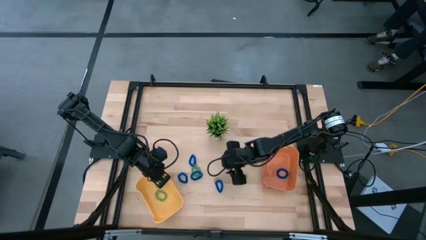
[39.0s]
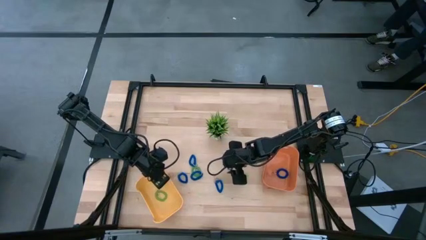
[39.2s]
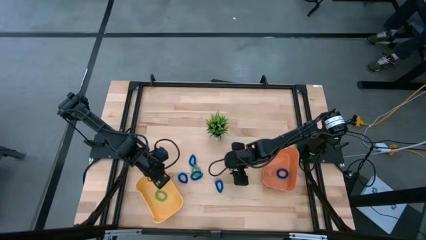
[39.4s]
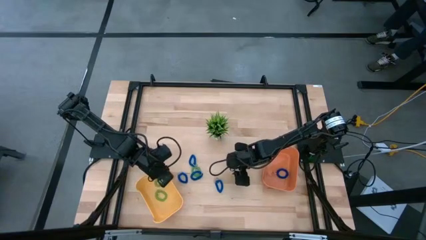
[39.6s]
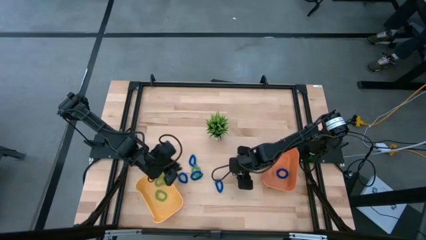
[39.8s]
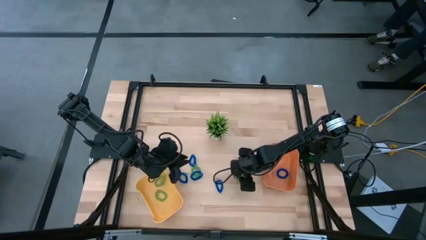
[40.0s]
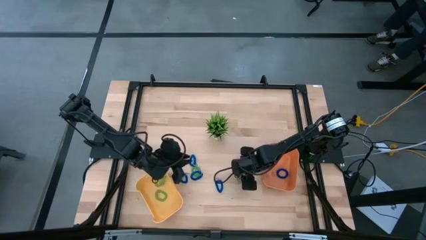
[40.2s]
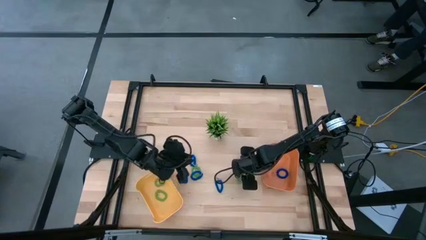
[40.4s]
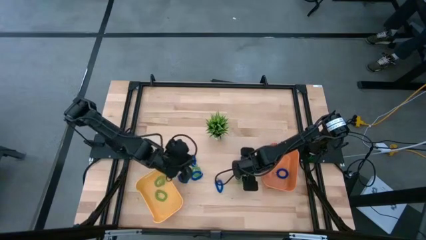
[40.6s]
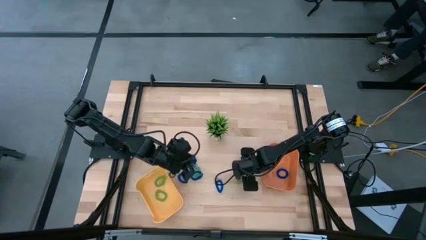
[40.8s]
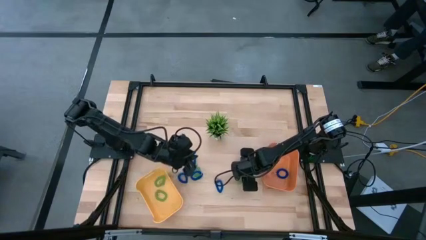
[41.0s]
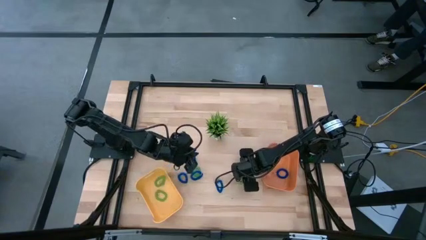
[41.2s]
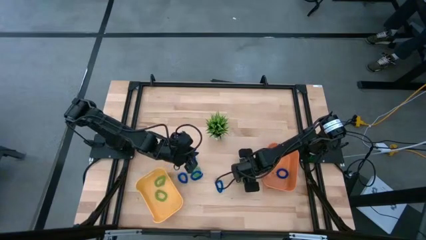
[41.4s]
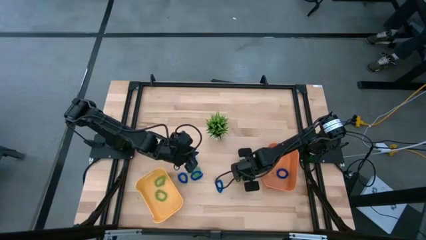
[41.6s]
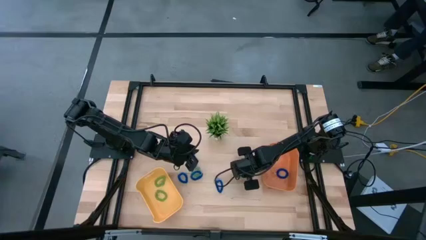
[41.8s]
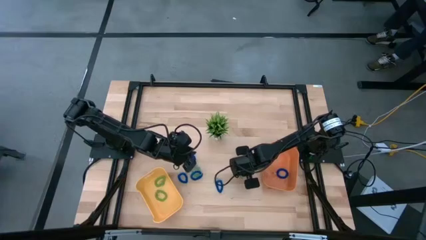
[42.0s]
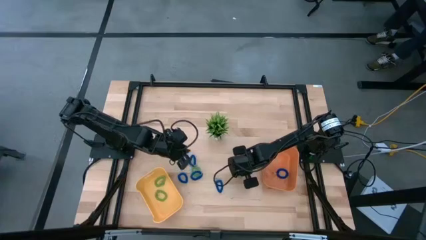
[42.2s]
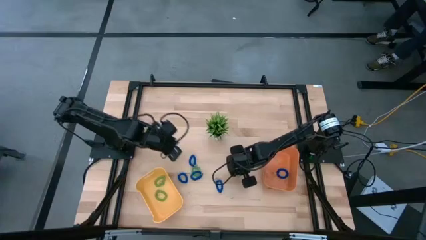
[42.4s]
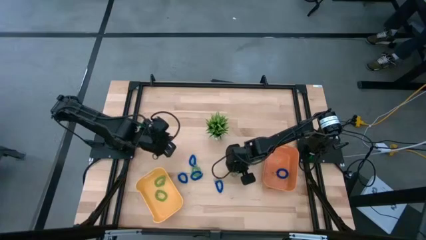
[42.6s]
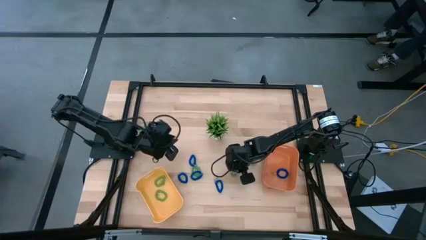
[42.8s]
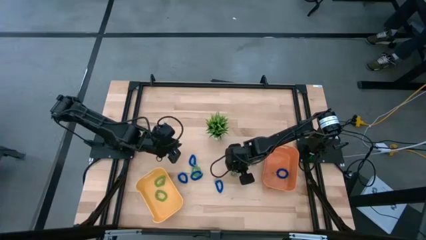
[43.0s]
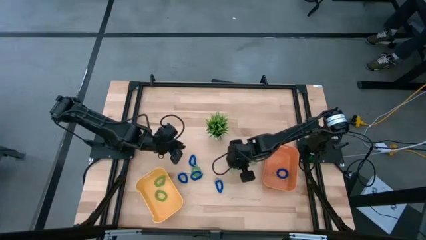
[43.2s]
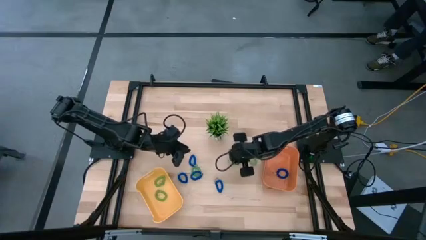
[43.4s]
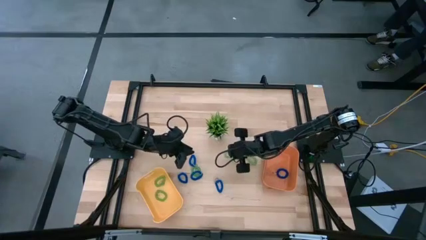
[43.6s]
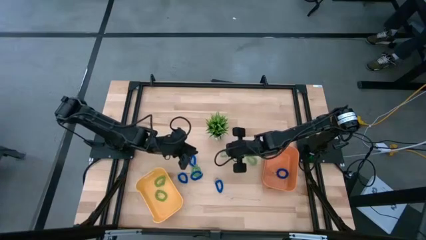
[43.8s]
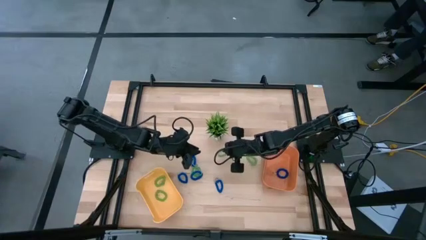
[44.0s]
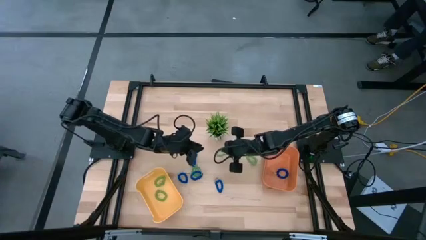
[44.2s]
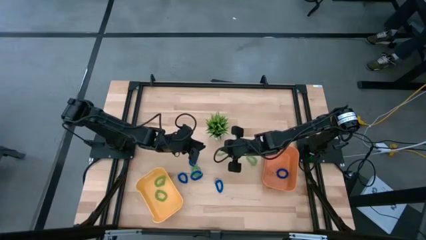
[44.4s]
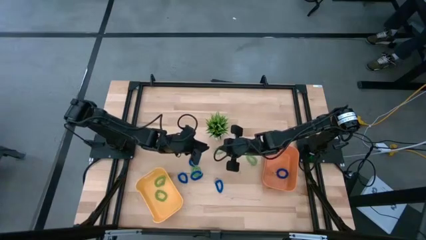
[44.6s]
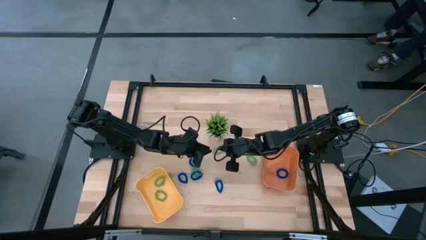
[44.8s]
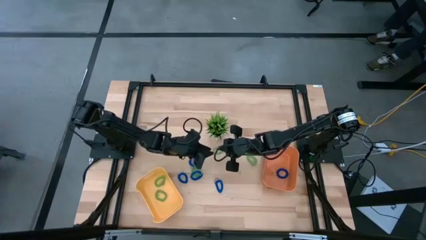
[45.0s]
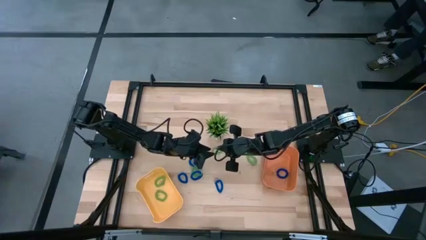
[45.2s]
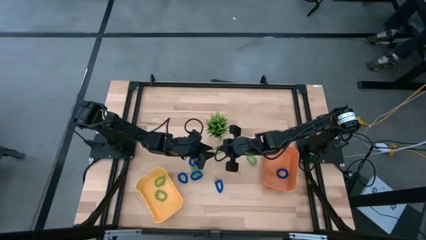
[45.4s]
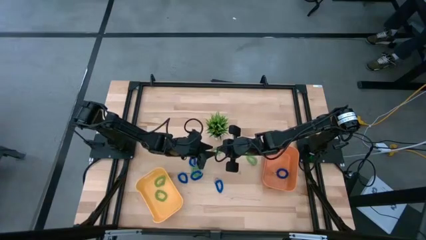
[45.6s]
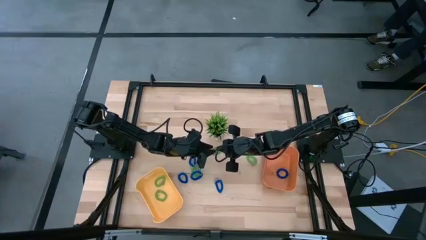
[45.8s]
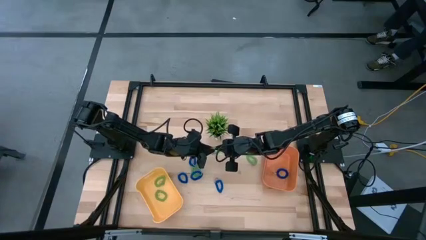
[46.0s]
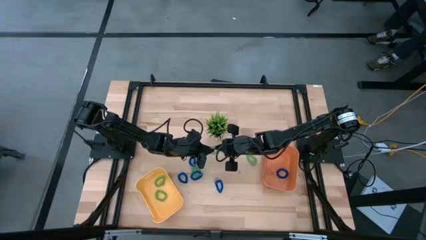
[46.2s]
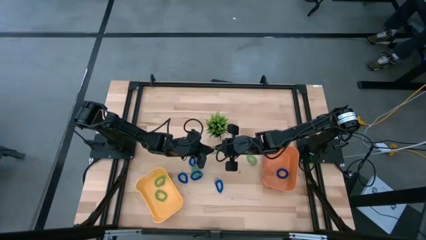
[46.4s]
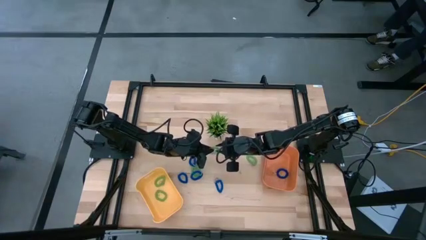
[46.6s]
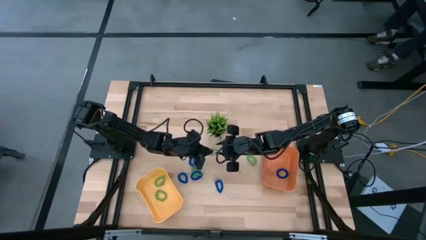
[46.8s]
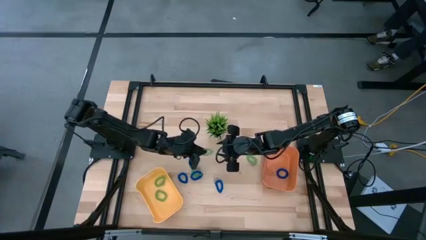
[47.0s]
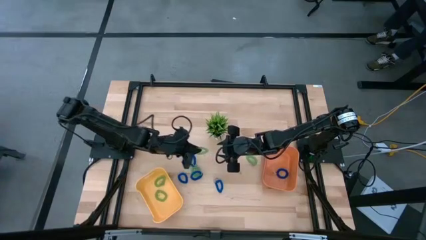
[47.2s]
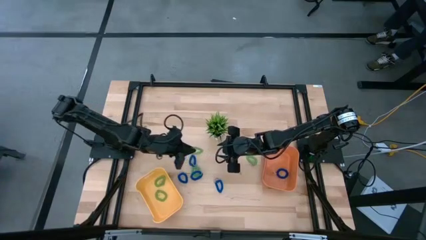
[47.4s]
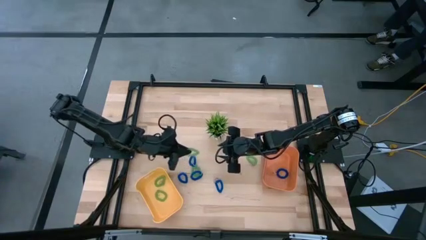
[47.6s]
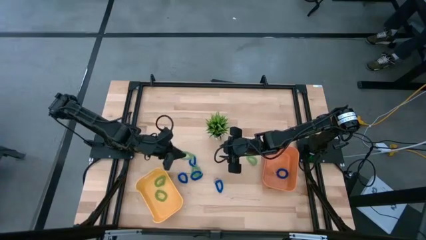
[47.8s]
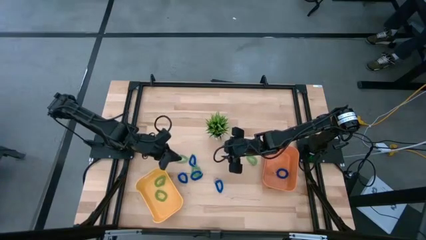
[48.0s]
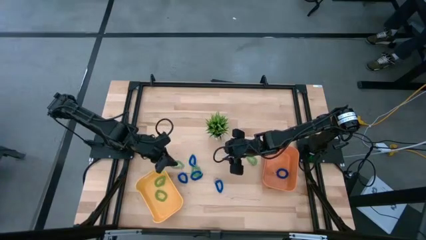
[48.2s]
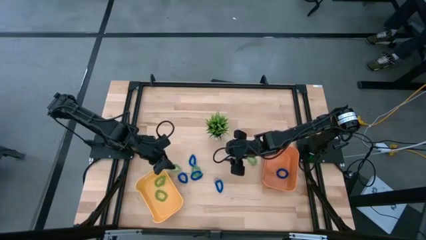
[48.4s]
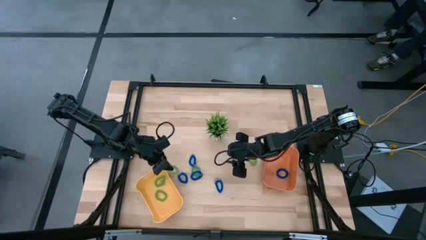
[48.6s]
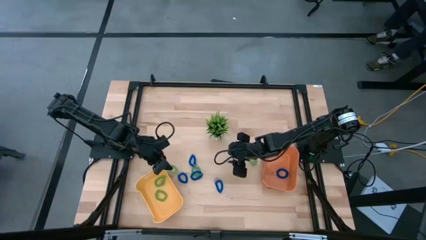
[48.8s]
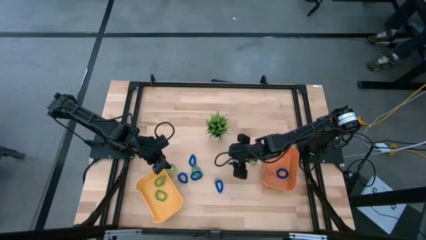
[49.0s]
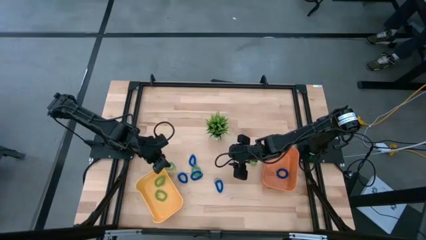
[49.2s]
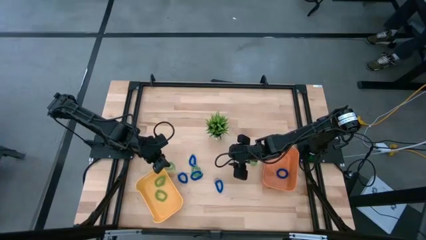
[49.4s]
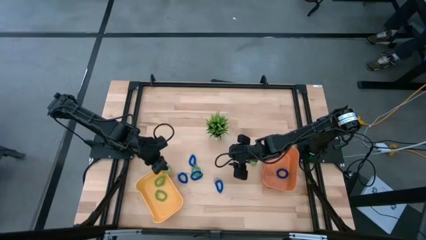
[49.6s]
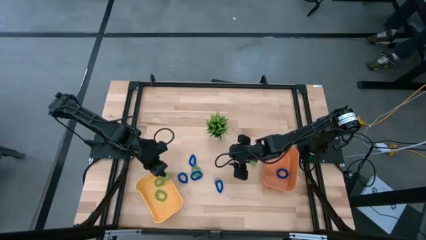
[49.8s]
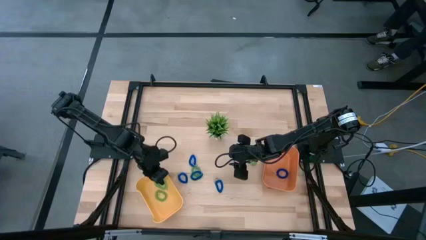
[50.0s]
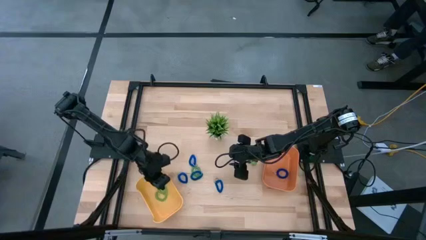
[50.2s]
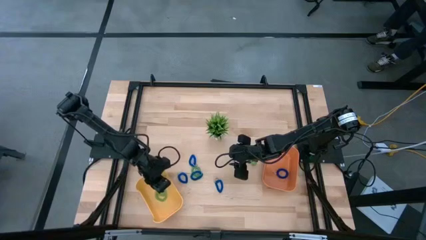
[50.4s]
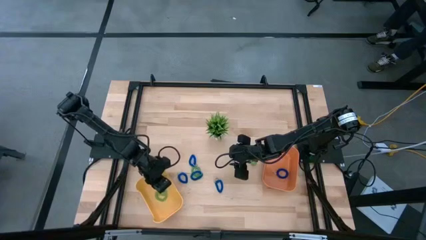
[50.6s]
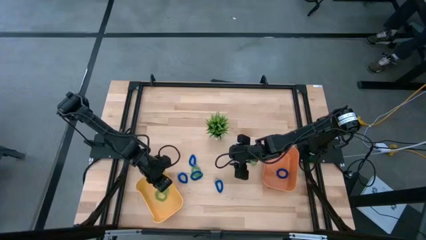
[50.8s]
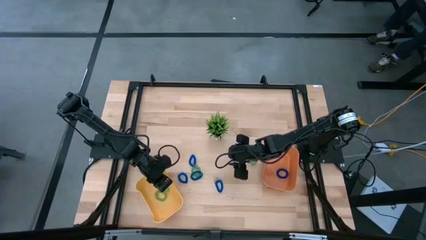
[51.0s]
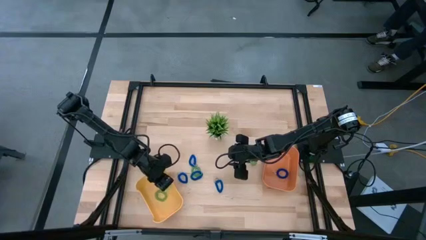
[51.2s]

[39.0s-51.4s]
Task: Sort spring keychains
Put the green spring keychain into the yellow bin
